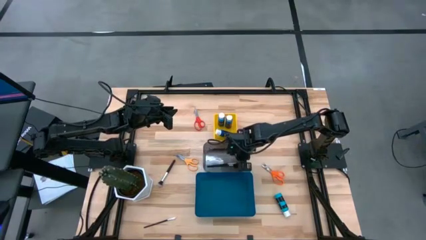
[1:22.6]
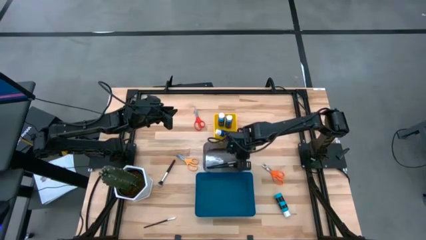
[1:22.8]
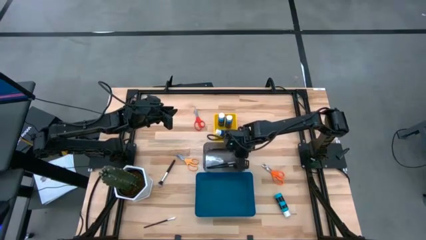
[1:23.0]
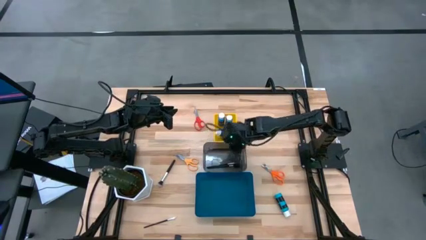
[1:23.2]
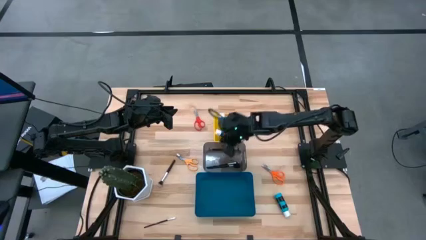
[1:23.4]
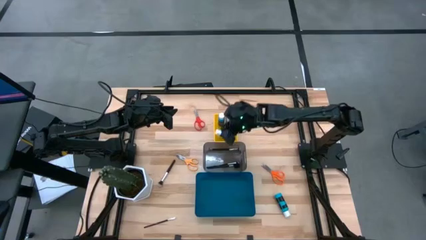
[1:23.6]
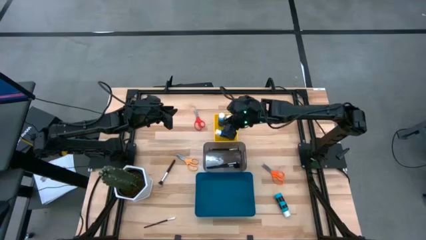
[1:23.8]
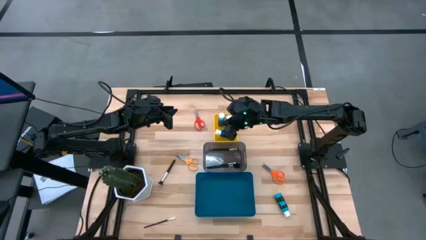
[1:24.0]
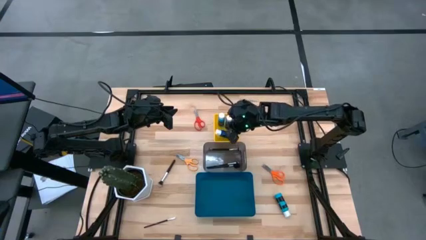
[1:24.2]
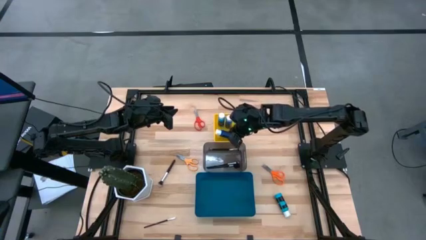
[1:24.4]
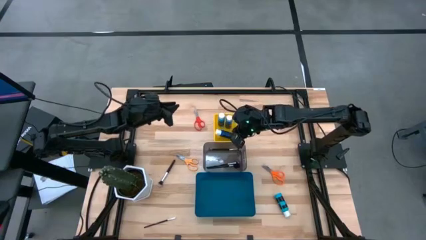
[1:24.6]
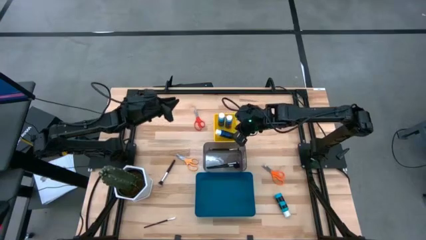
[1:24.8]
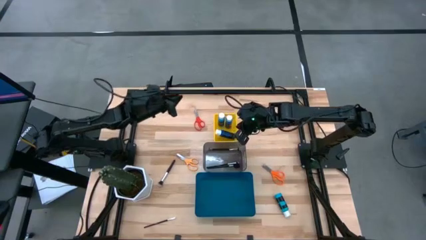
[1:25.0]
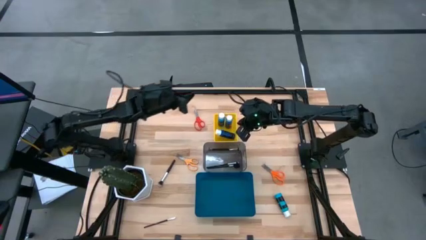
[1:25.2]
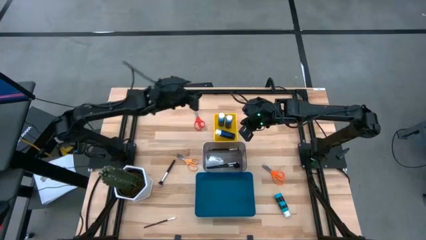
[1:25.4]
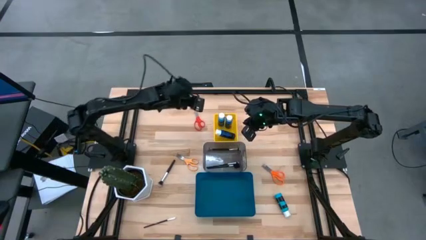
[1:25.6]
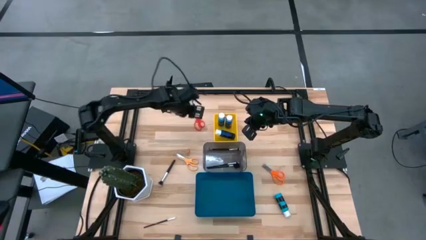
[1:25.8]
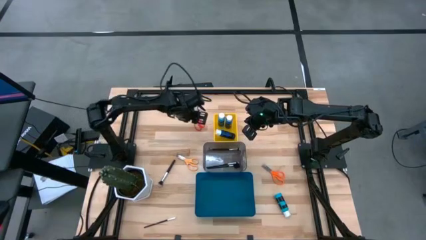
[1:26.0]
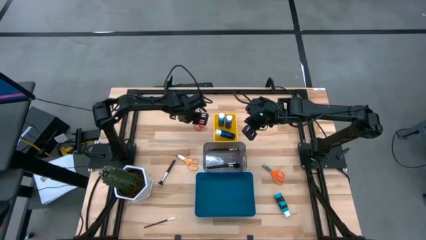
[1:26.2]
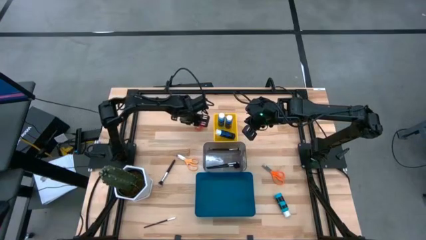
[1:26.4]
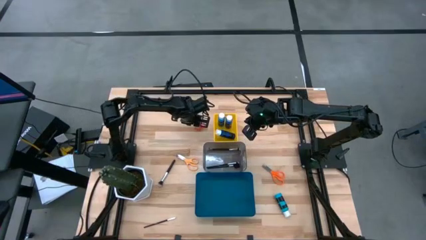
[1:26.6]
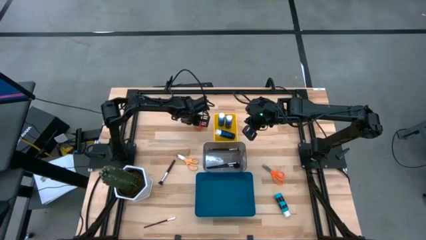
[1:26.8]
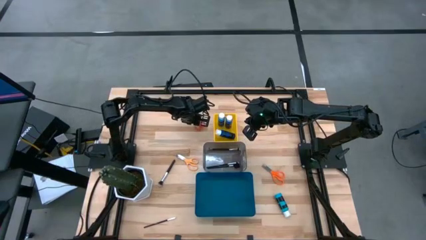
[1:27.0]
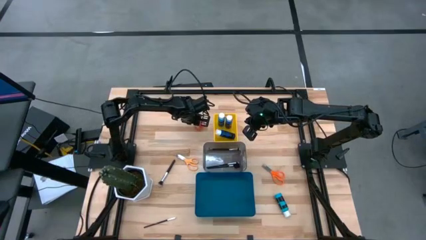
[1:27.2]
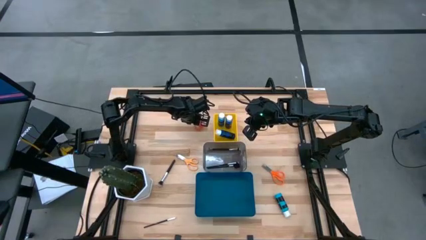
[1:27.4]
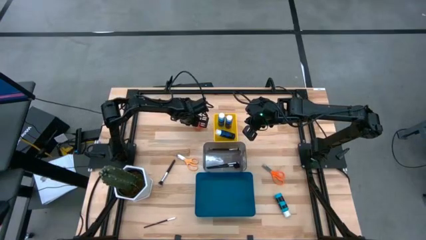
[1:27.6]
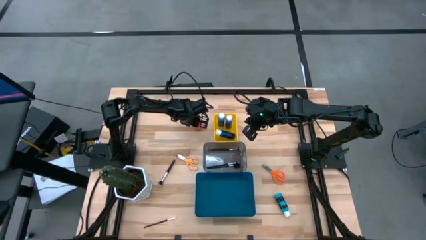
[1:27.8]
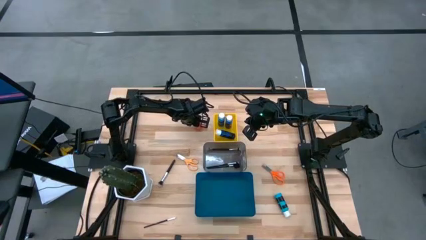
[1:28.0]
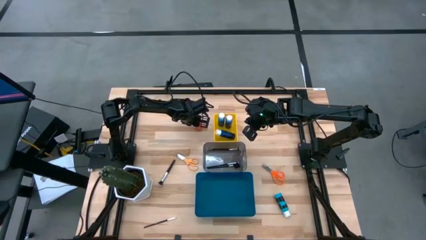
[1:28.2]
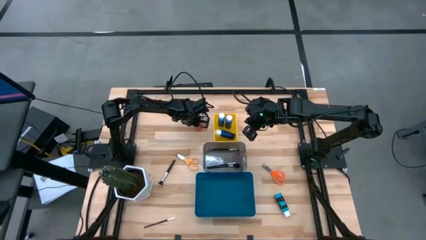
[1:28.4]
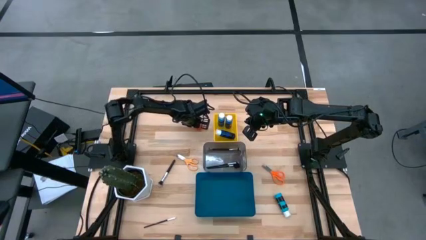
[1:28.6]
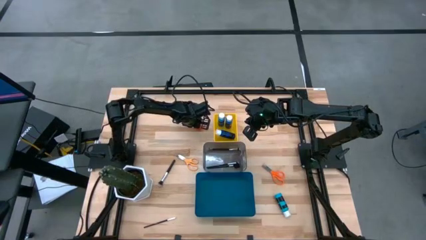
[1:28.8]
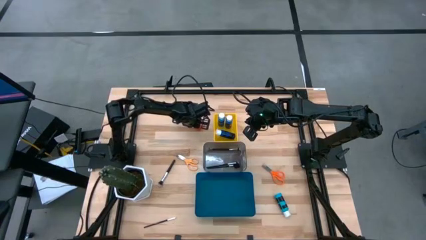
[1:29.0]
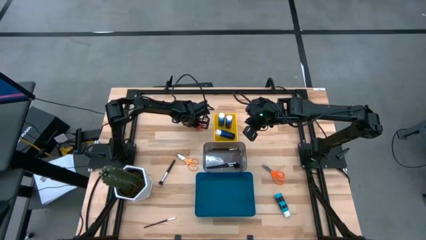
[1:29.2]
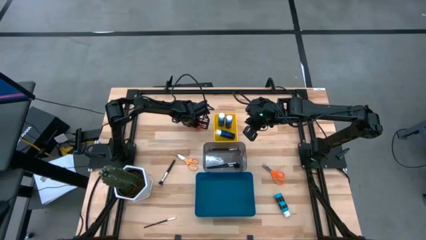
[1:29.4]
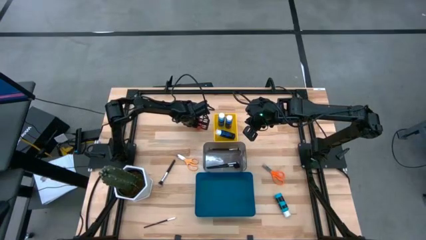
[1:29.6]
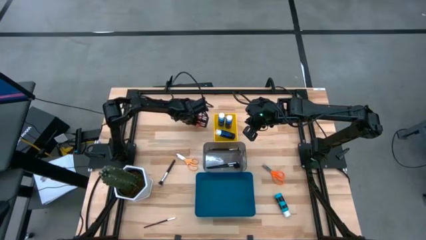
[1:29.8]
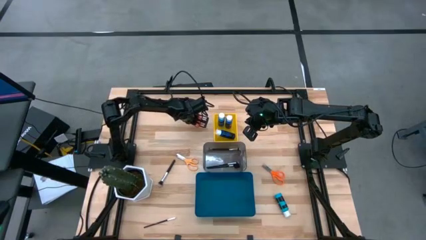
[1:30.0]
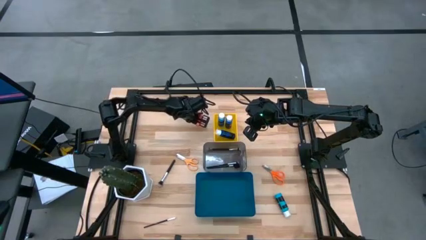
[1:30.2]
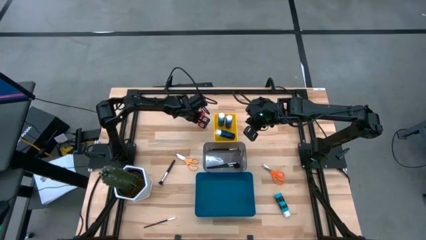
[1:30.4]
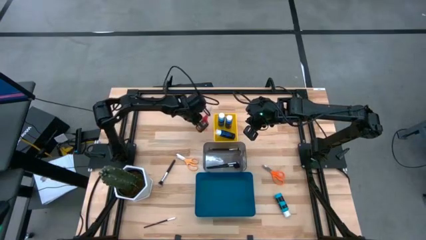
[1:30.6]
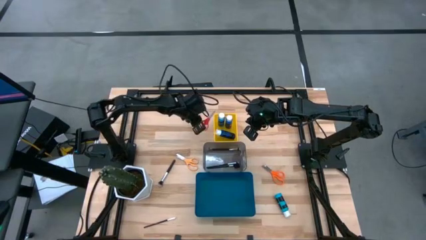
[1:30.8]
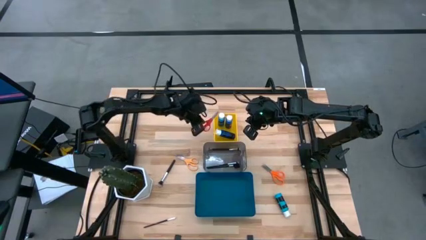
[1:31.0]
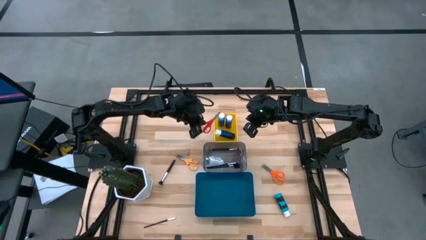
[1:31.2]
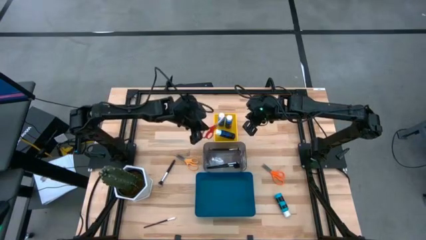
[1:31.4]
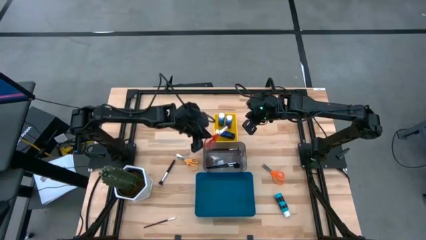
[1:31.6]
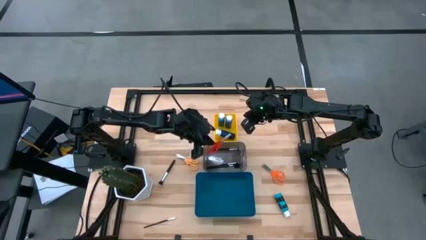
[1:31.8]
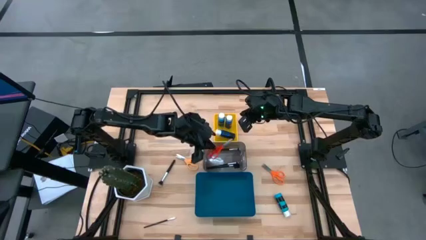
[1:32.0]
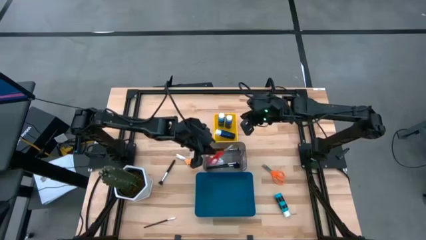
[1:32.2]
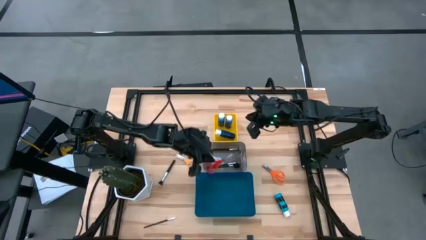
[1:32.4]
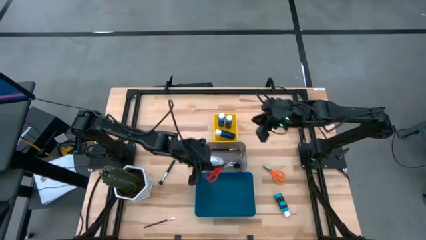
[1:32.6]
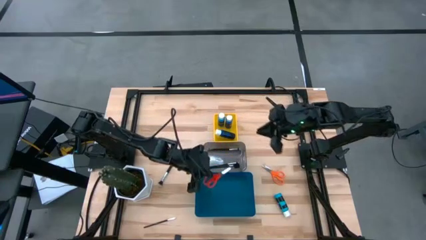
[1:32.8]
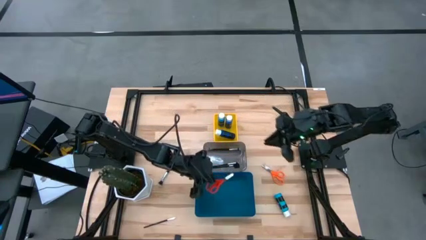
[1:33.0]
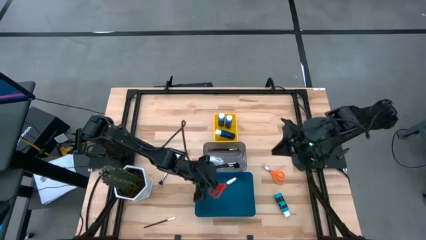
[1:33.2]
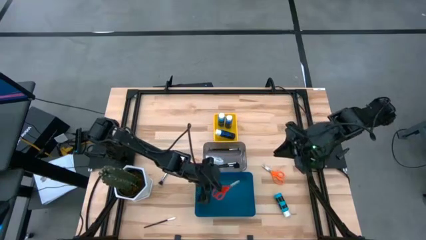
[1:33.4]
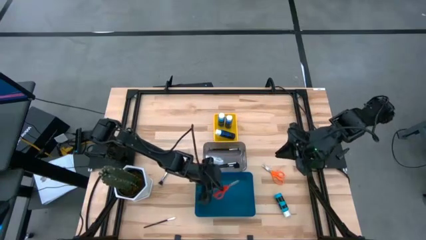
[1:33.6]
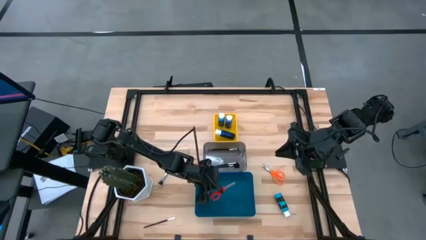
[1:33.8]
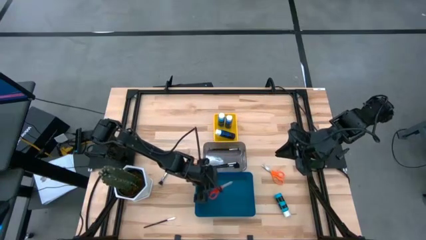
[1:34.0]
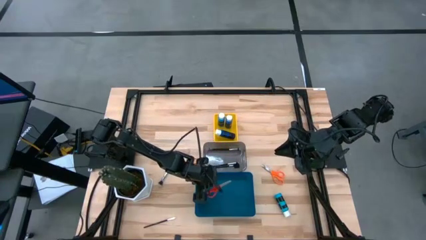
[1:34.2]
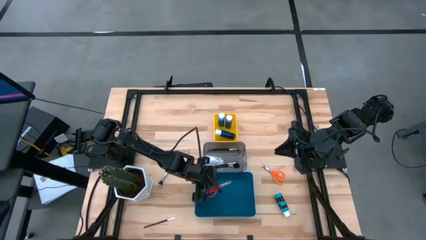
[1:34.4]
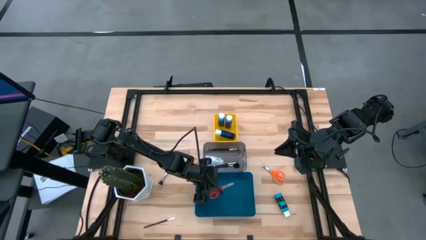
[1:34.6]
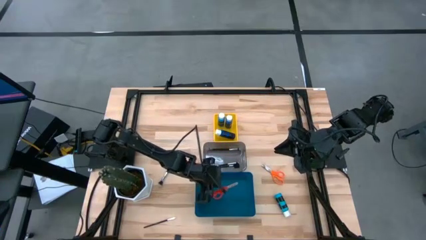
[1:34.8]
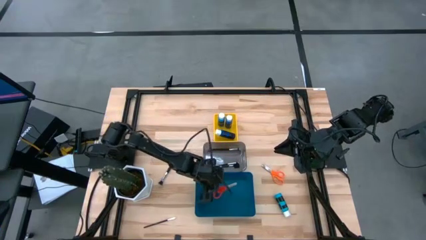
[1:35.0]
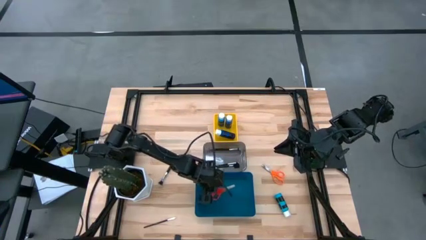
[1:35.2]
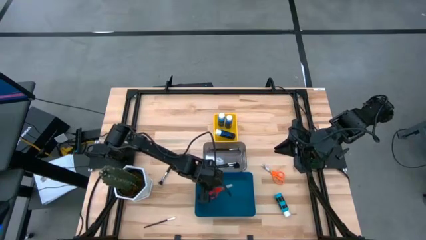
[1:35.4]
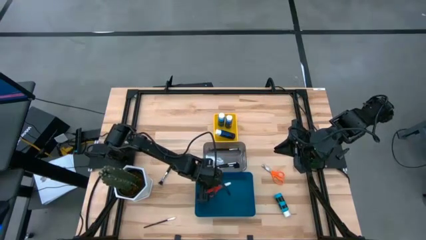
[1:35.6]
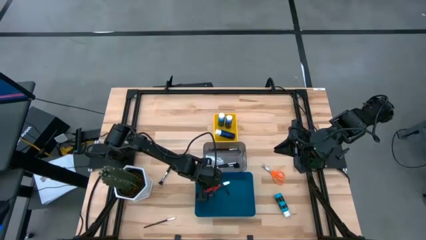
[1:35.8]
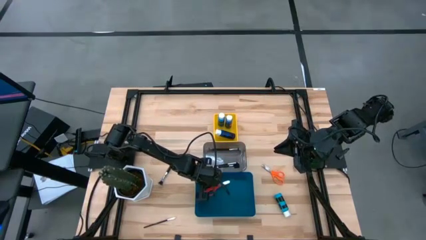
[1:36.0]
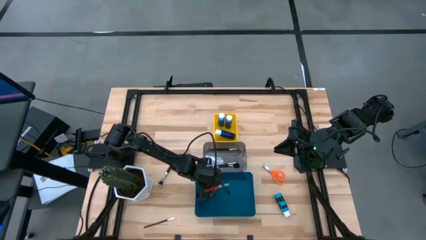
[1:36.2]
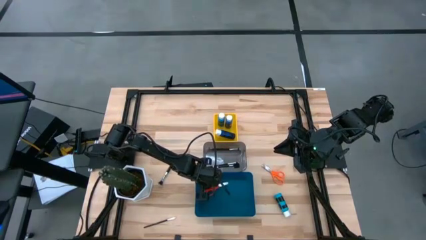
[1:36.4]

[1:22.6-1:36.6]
Task: Pick & Place Paint Supplies
Put the red scissors into the blue bin
